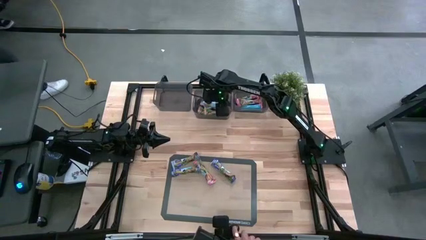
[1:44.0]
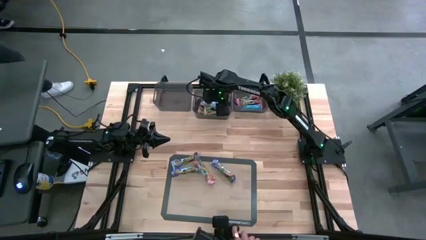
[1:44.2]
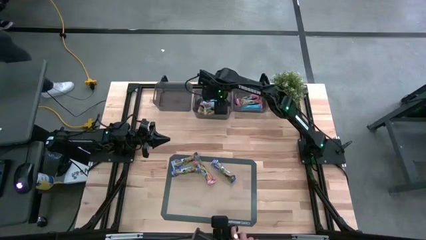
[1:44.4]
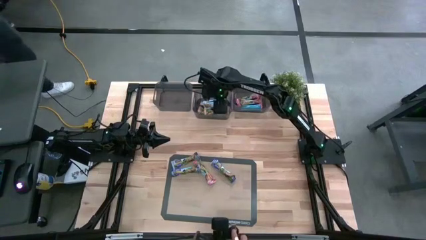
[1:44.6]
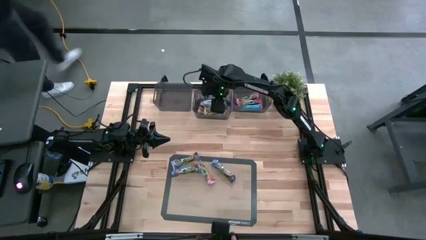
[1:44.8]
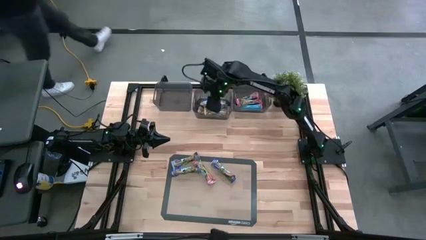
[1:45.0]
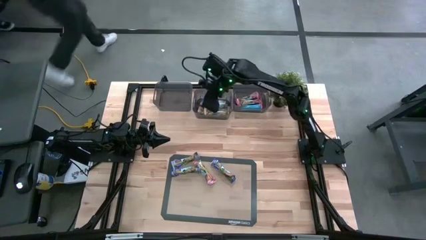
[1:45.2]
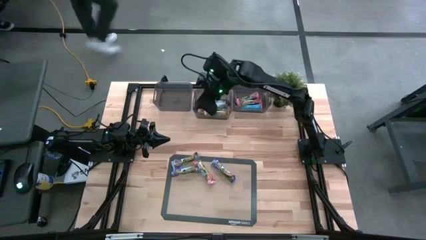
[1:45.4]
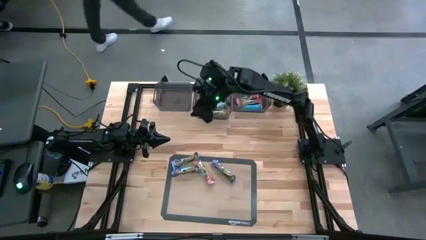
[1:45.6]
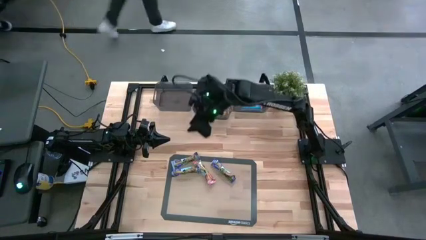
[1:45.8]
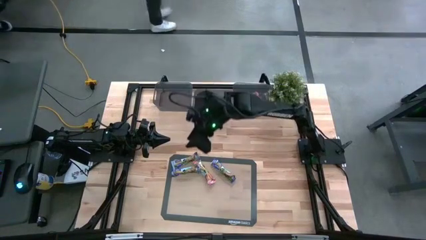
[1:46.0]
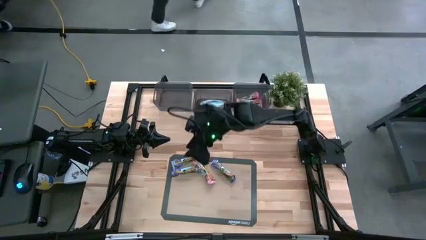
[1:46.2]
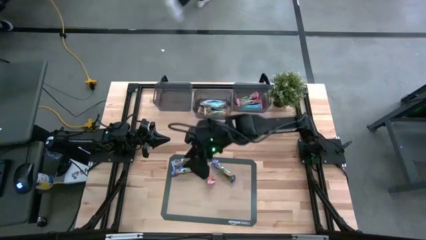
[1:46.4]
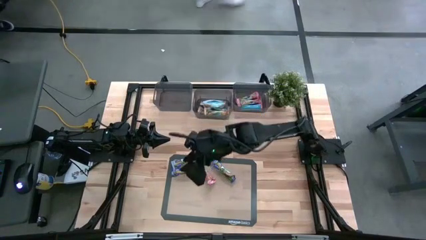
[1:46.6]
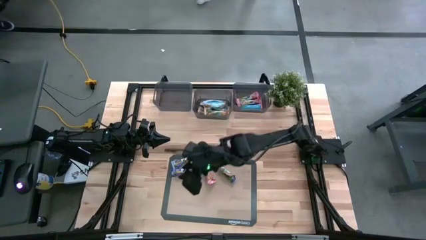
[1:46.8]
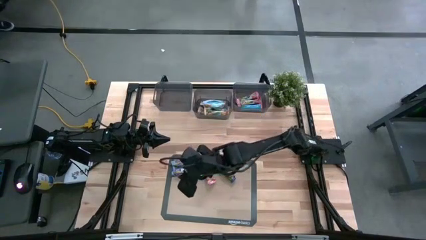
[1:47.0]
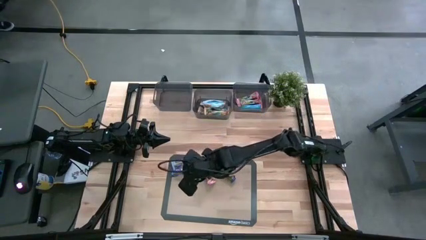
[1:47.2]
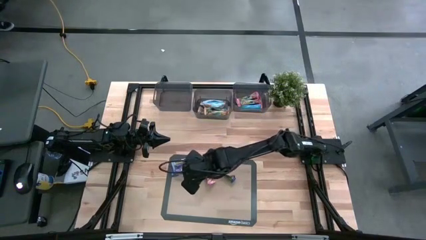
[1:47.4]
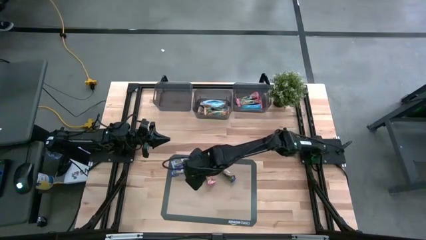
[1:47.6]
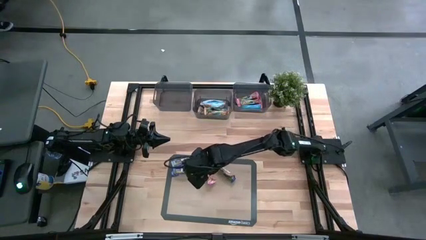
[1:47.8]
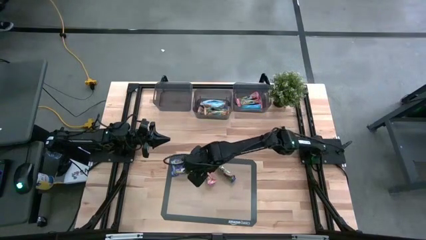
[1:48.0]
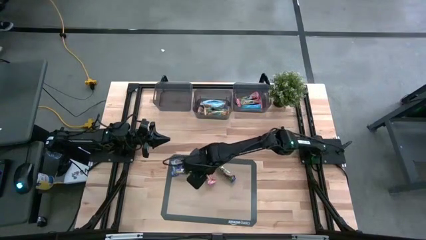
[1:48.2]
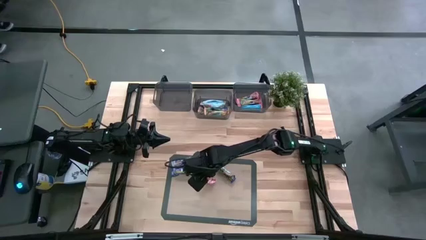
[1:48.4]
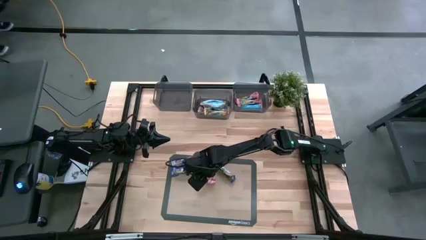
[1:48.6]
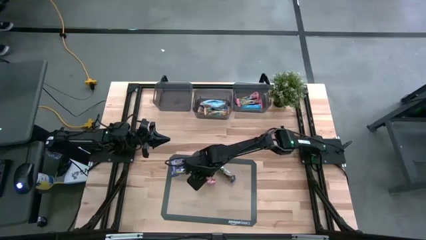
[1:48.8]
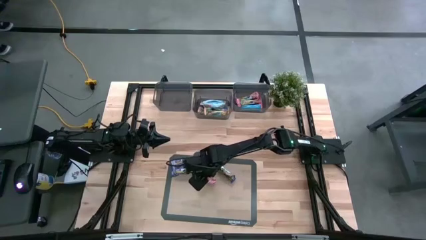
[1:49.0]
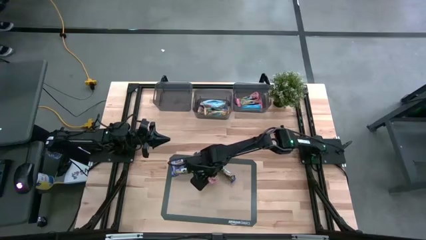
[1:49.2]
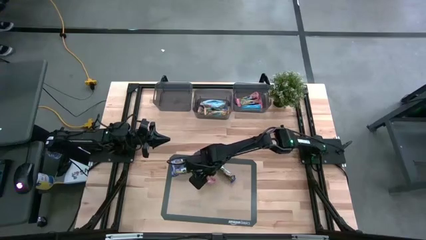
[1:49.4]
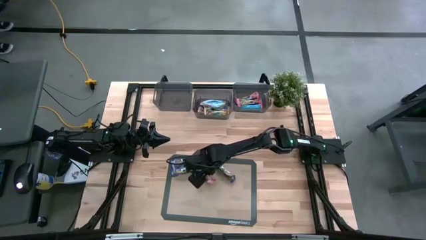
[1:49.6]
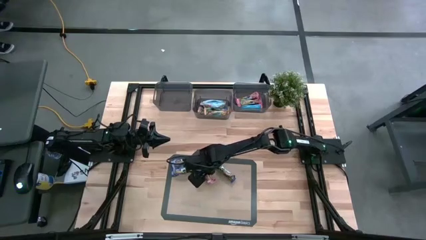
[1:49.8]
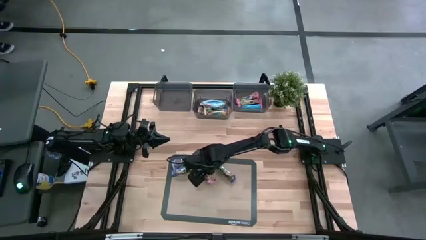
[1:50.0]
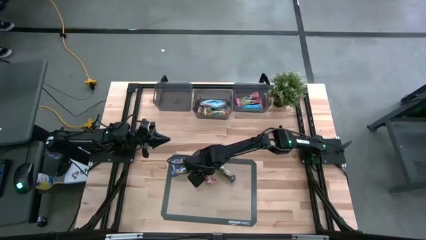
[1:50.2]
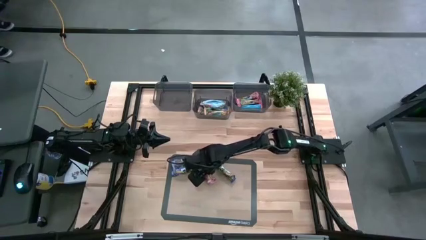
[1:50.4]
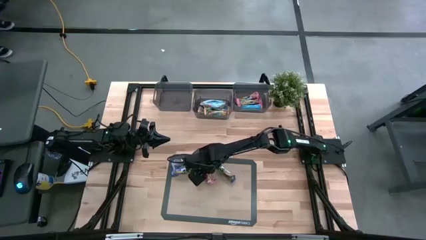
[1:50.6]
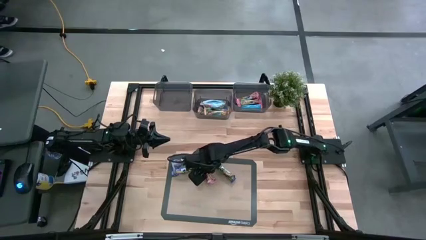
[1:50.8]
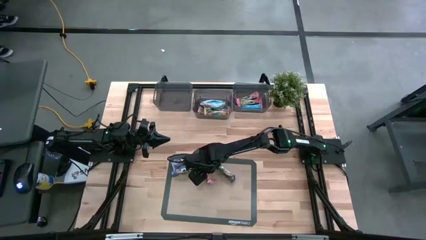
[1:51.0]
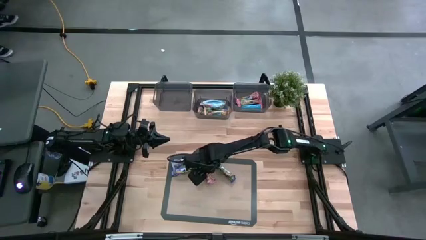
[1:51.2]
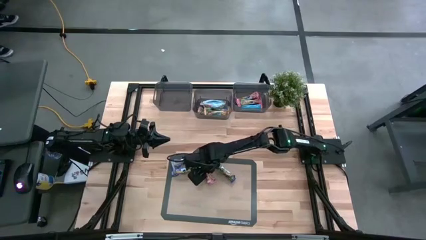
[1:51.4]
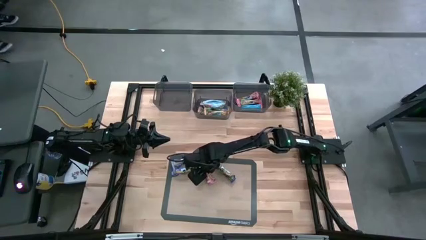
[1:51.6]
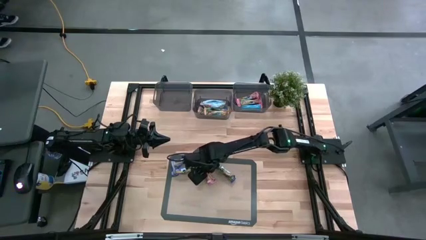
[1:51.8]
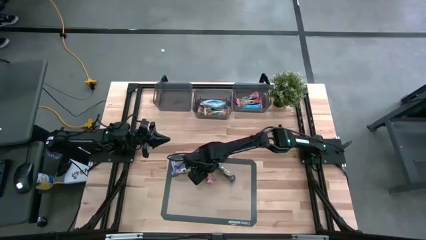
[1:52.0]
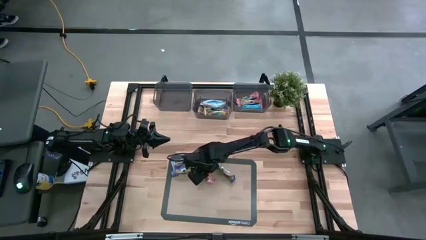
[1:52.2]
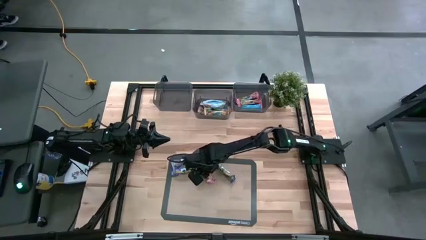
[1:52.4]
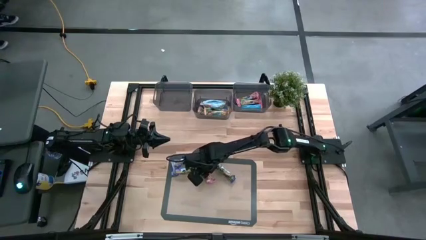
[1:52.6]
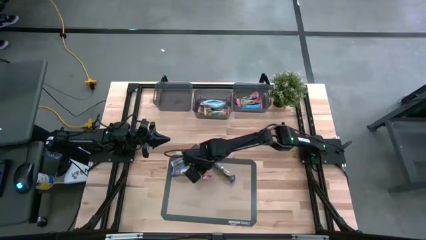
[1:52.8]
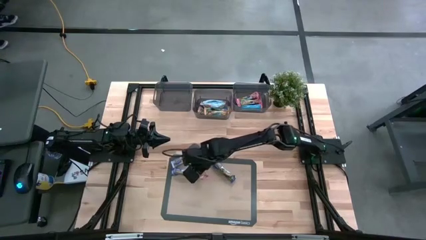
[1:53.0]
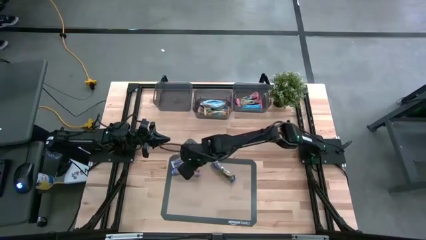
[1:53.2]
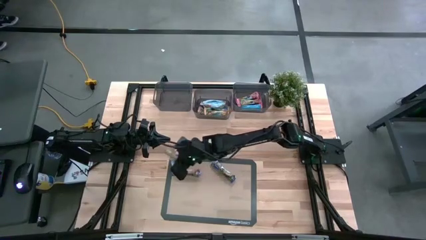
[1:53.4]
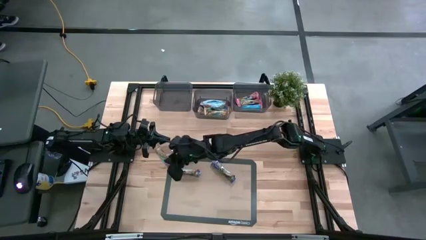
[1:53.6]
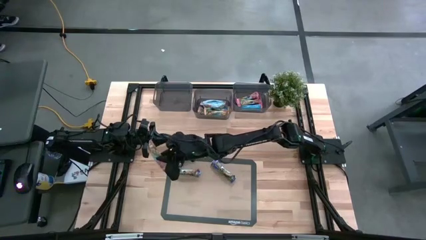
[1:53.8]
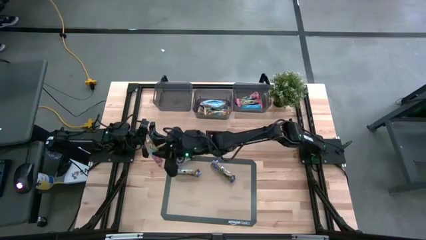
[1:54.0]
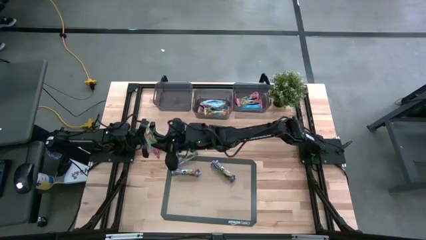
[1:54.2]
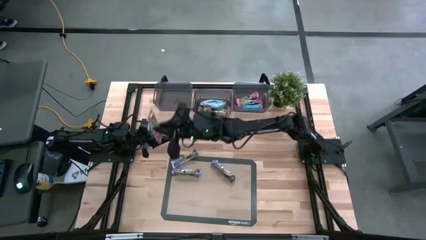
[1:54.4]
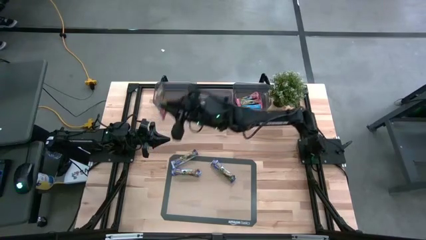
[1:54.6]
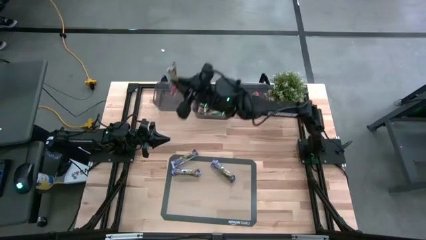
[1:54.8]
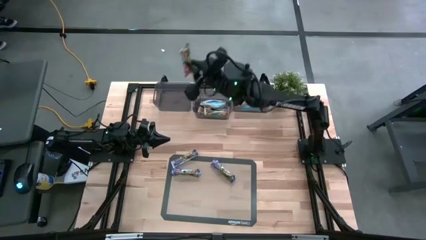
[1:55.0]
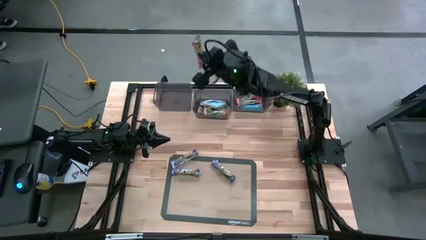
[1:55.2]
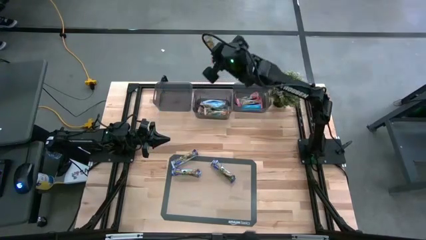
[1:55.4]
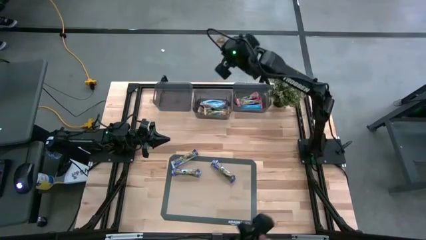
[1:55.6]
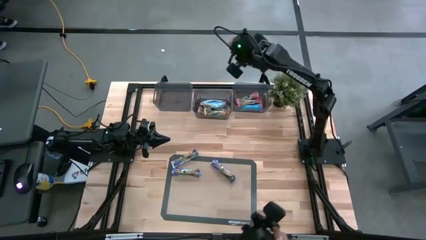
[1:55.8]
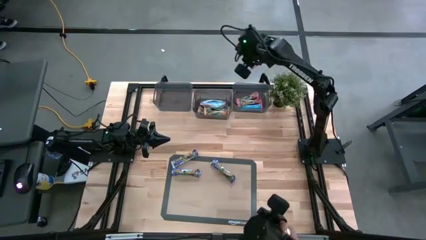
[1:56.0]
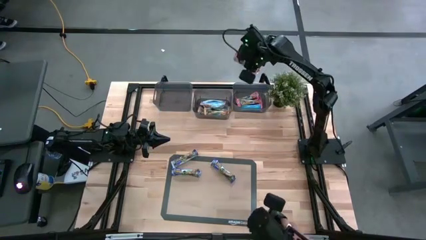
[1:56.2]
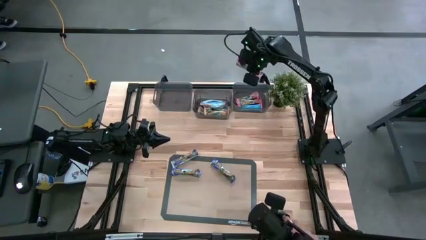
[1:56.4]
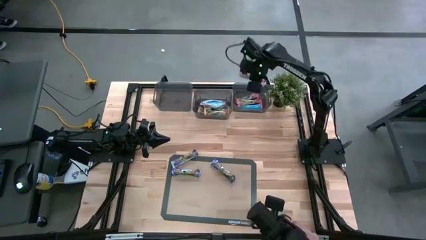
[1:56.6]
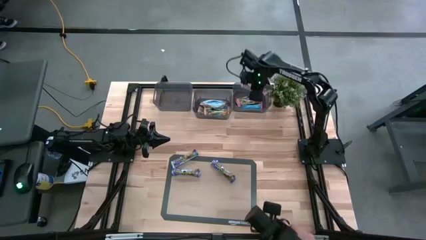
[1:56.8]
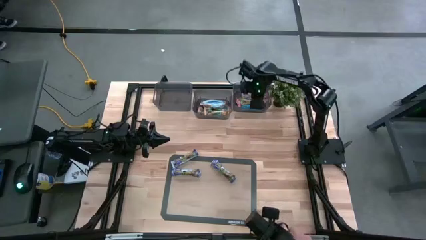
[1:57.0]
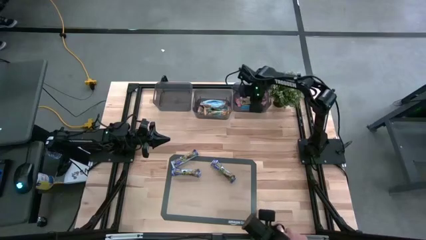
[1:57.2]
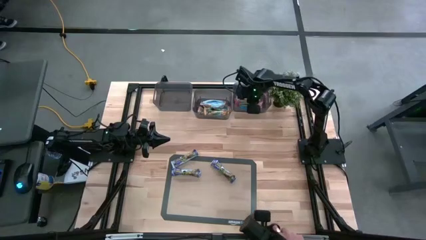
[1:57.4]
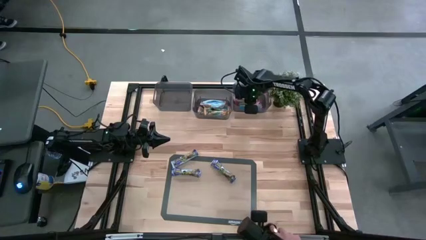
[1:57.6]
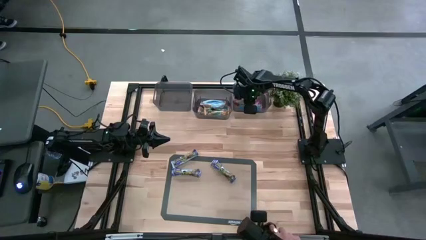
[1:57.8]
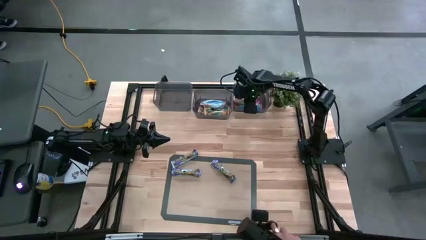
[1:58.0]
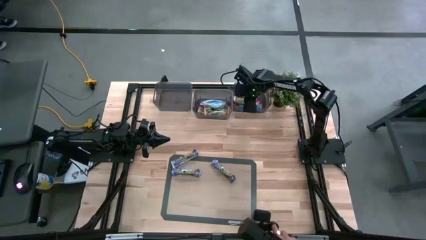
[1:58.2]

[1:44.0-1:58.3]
Task: Pick and place Granola Bars by type
Put the red granola bar into the right black bin

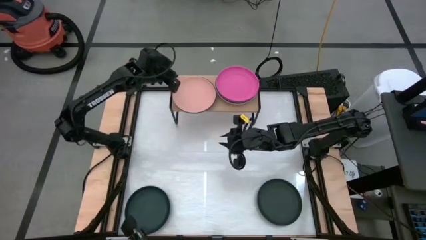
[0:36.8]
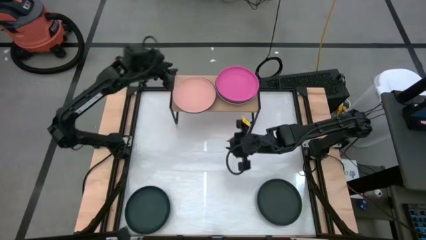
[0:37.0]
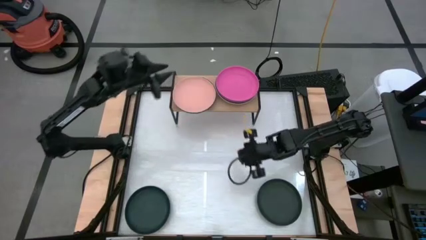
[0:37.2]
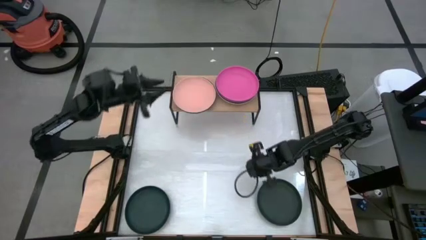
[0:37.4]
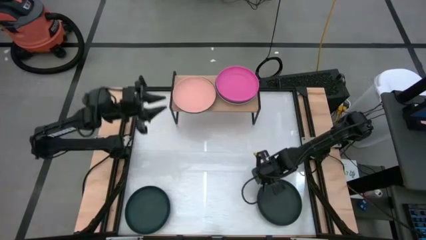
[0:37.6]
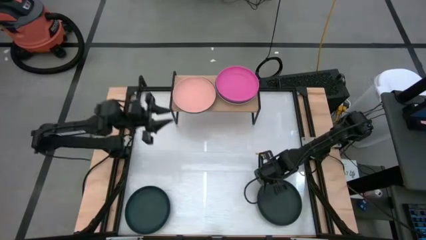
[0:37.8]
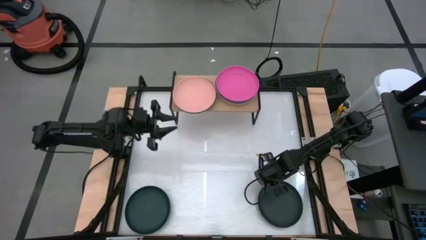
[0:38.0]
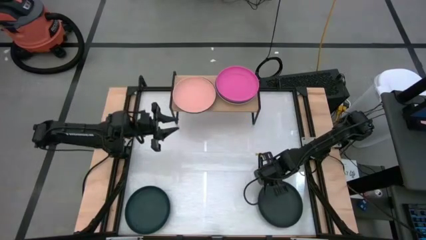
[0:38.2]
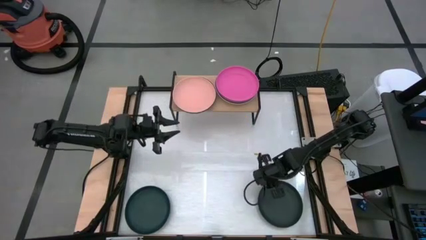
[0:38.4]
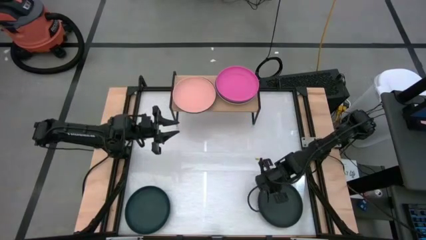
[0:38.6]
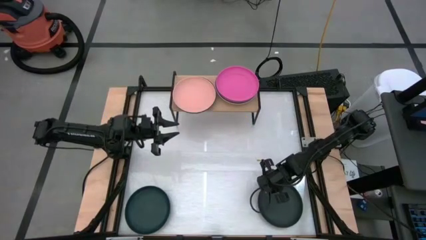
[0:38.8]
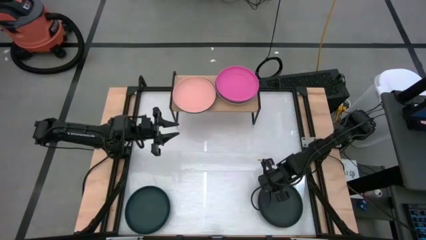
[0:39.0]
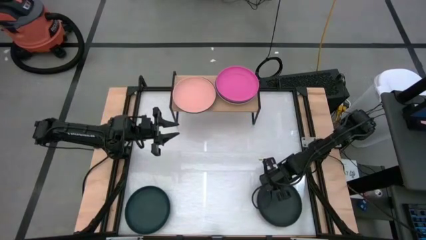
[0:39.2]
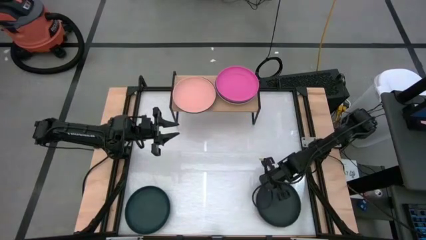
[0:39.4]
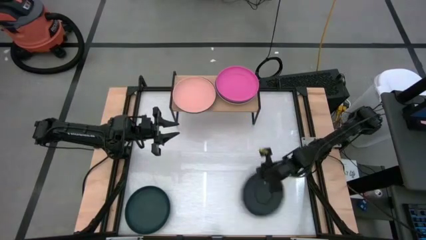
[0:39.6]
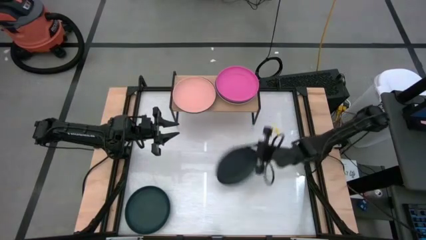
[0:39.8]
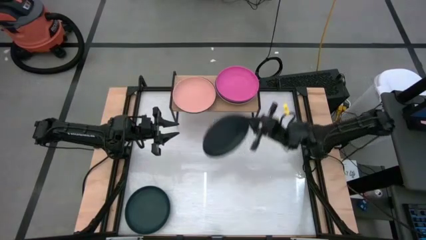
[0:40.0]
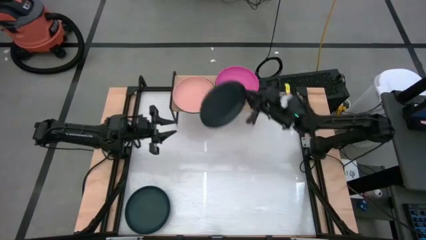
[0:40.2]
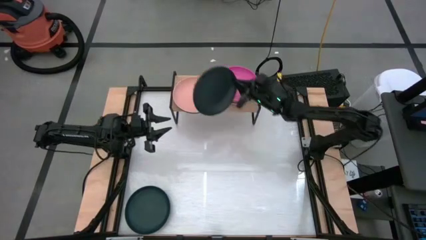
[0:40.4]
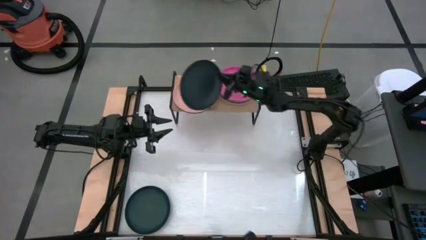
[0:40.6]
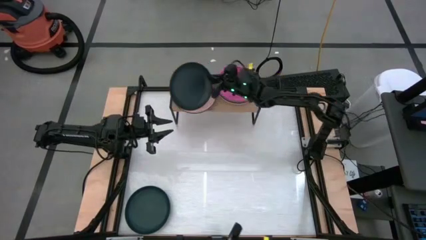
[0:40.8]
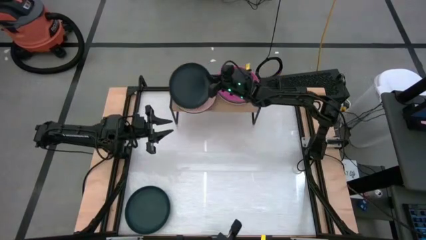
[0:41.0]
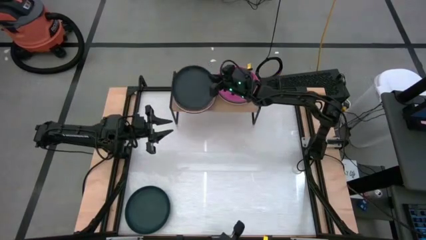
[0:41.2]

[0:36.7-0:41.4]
Task: Place and stack plates onto a shelf
Stack the right black plate on top of the orange plate on the shelf
